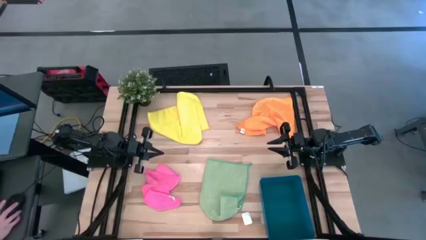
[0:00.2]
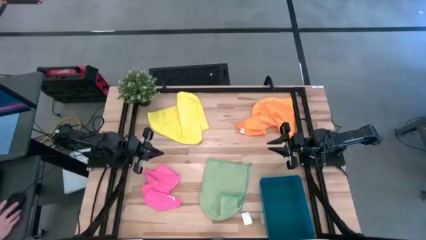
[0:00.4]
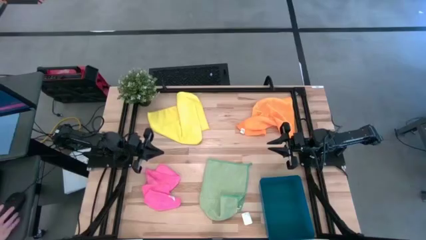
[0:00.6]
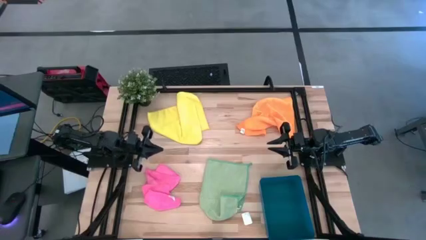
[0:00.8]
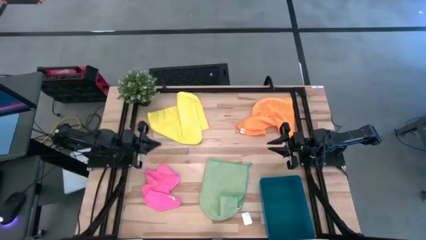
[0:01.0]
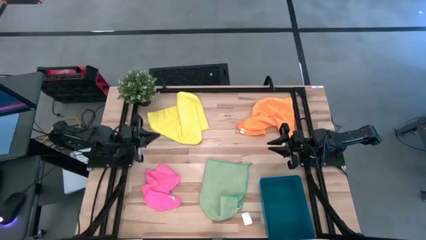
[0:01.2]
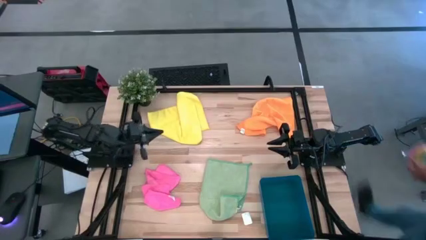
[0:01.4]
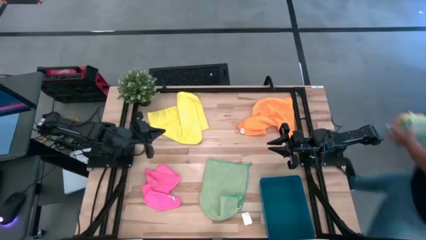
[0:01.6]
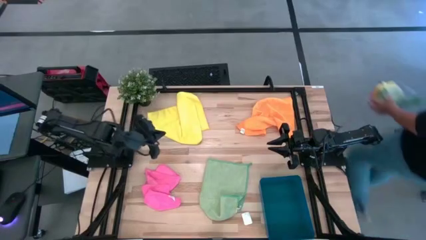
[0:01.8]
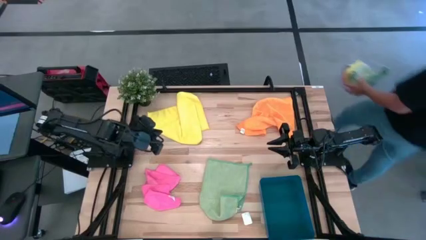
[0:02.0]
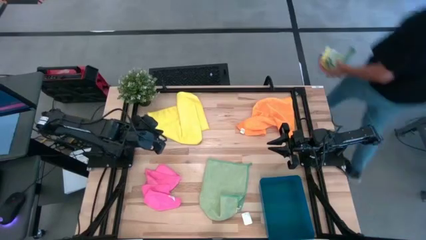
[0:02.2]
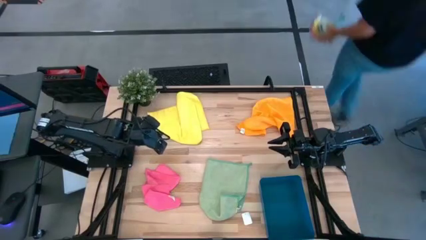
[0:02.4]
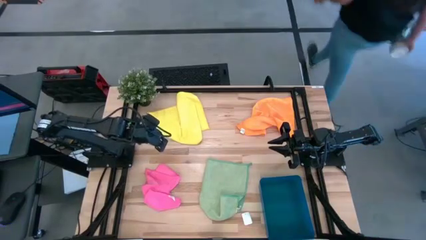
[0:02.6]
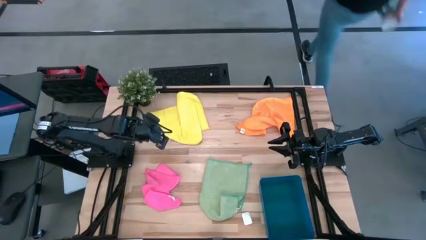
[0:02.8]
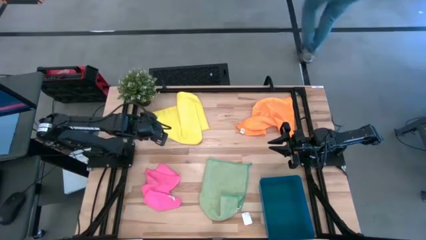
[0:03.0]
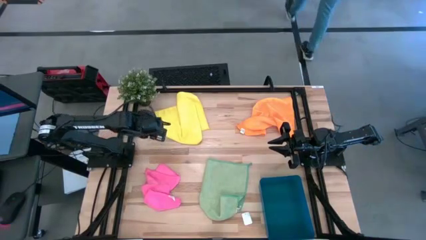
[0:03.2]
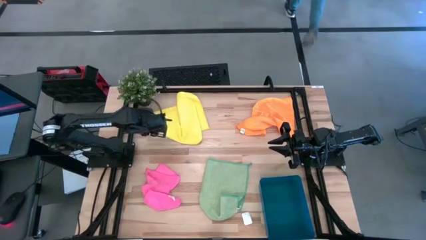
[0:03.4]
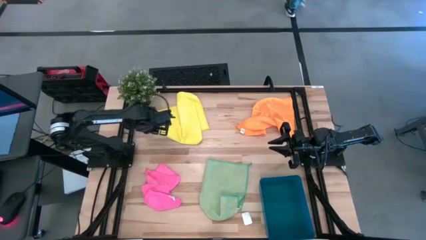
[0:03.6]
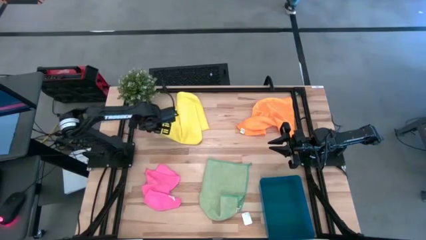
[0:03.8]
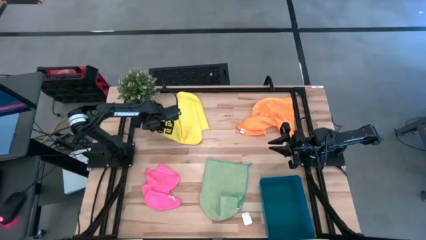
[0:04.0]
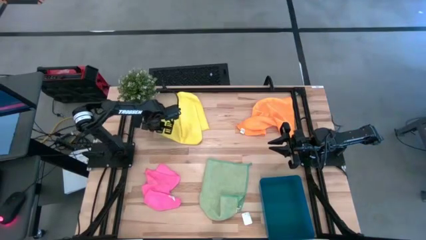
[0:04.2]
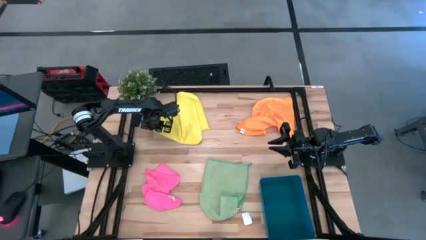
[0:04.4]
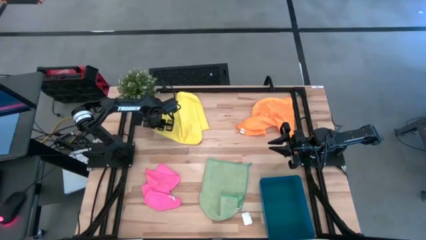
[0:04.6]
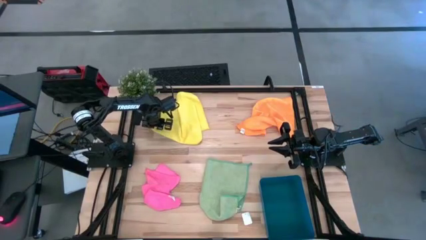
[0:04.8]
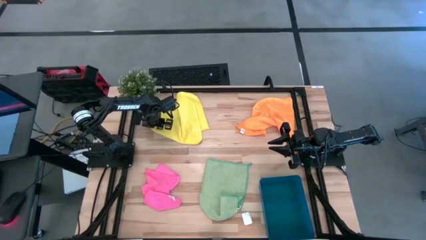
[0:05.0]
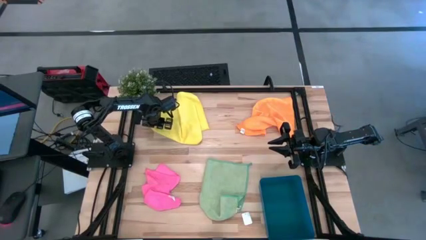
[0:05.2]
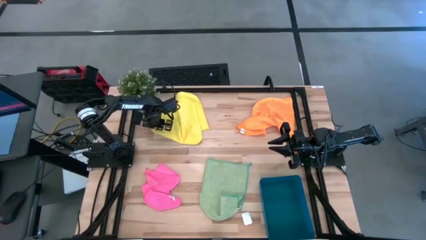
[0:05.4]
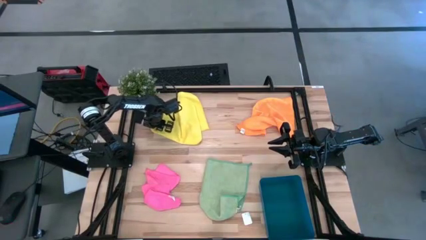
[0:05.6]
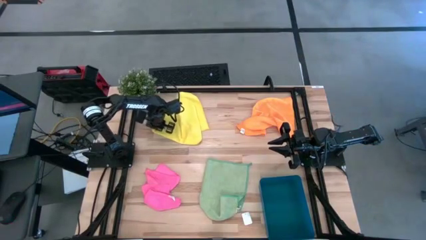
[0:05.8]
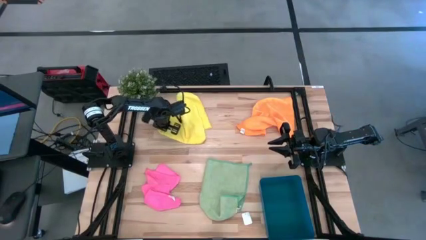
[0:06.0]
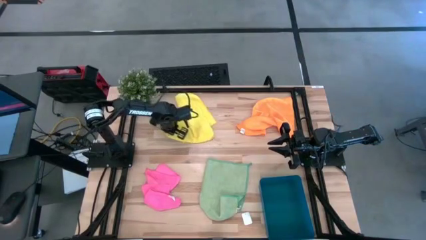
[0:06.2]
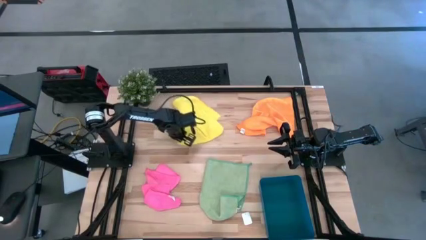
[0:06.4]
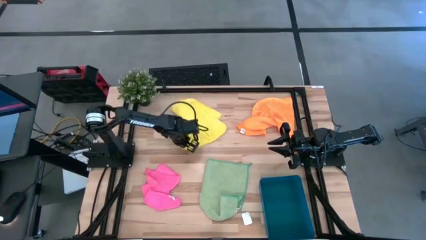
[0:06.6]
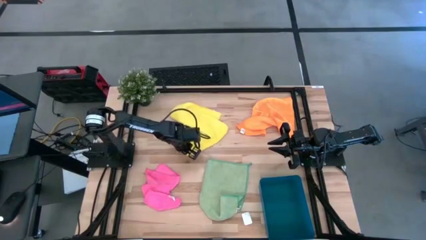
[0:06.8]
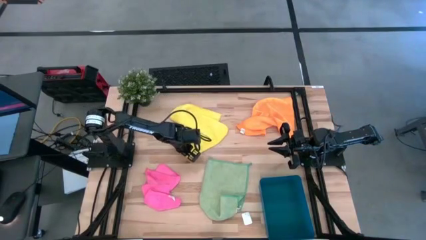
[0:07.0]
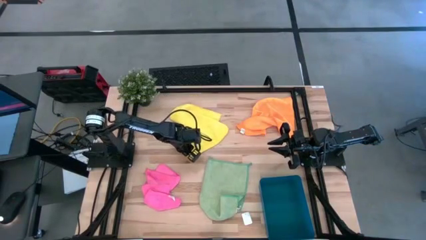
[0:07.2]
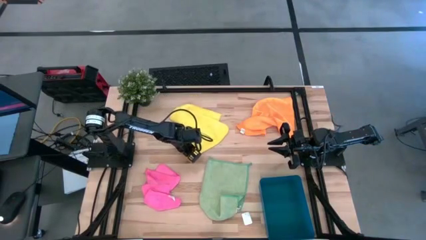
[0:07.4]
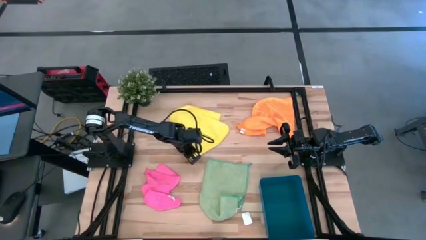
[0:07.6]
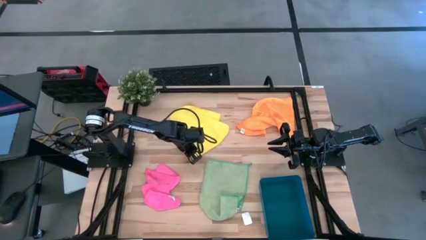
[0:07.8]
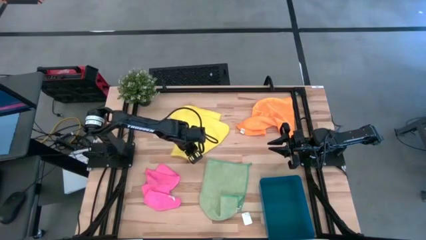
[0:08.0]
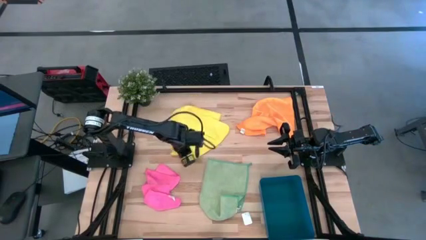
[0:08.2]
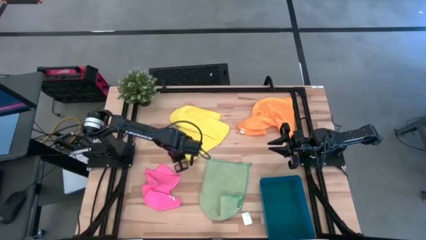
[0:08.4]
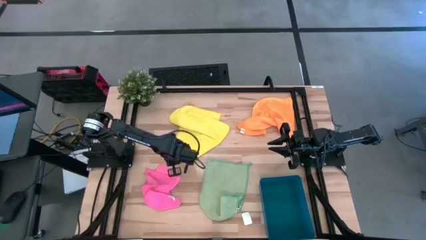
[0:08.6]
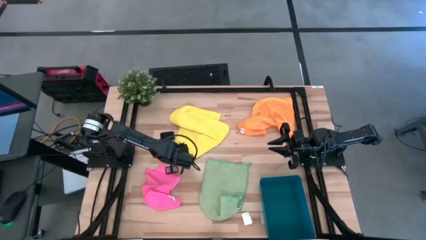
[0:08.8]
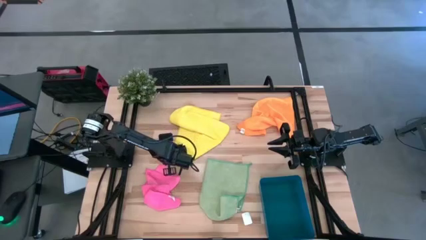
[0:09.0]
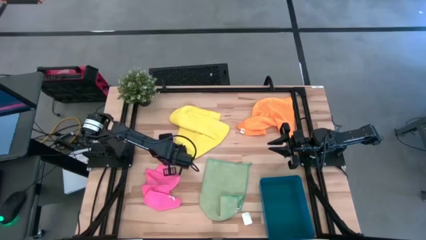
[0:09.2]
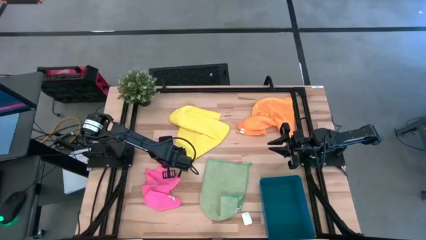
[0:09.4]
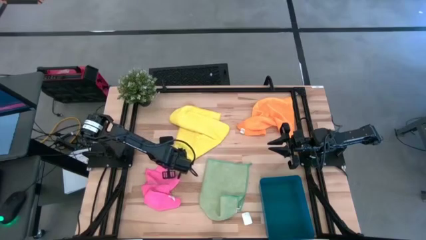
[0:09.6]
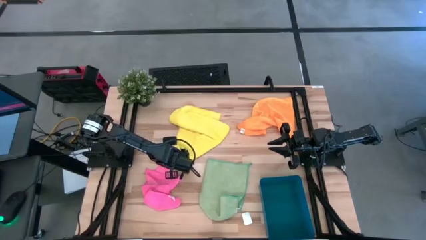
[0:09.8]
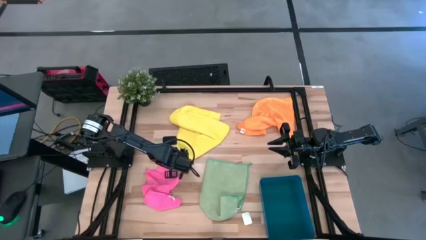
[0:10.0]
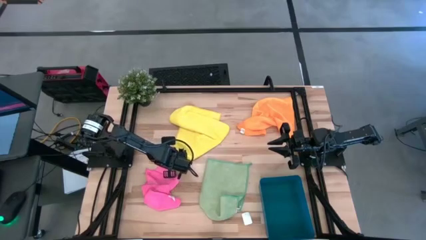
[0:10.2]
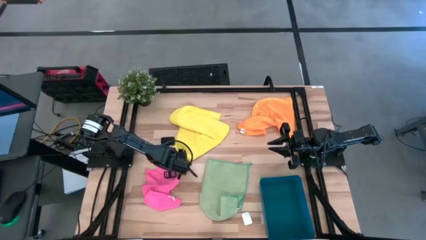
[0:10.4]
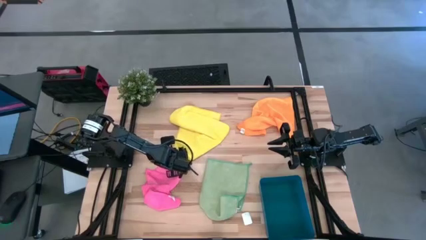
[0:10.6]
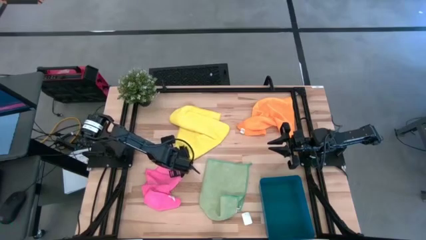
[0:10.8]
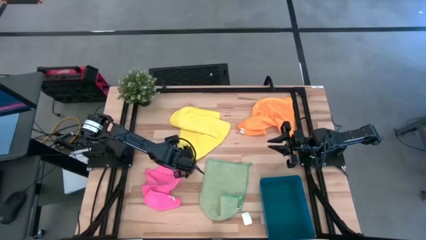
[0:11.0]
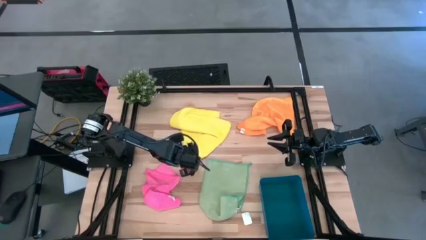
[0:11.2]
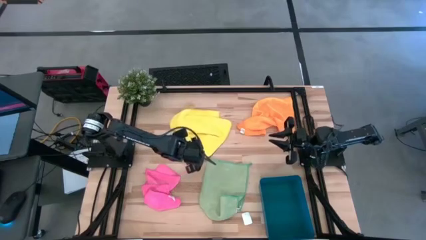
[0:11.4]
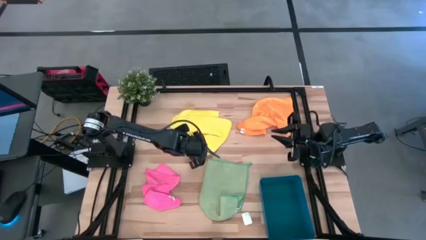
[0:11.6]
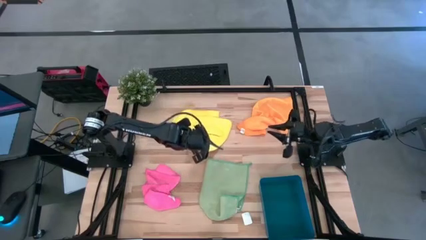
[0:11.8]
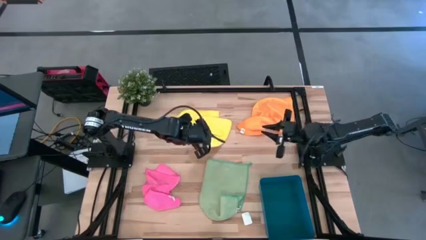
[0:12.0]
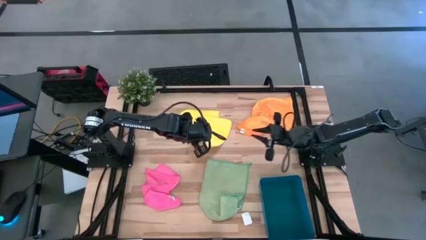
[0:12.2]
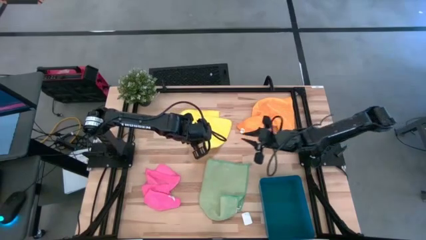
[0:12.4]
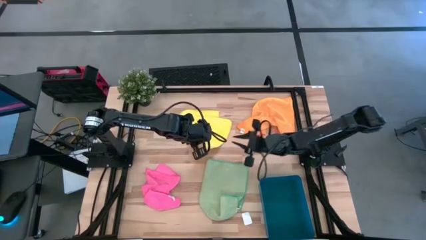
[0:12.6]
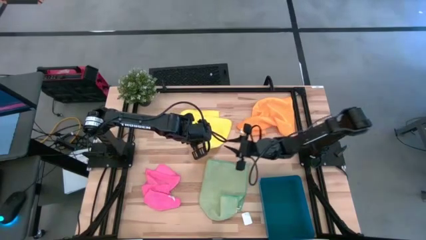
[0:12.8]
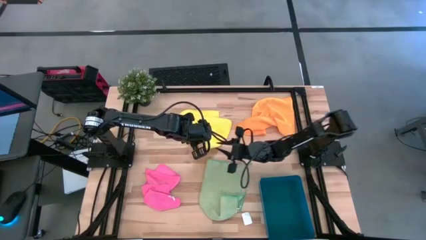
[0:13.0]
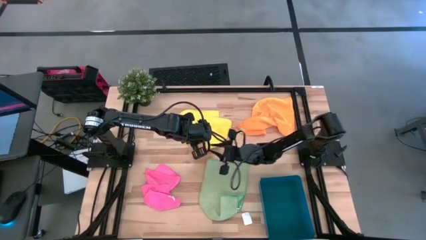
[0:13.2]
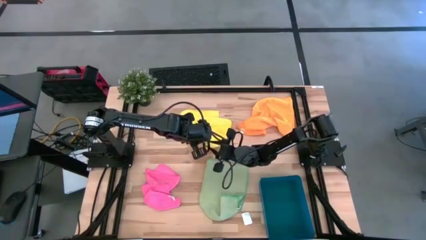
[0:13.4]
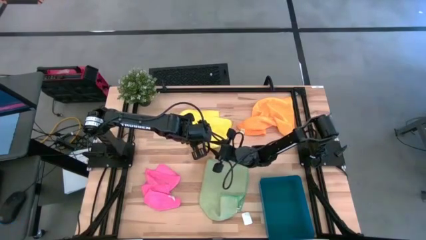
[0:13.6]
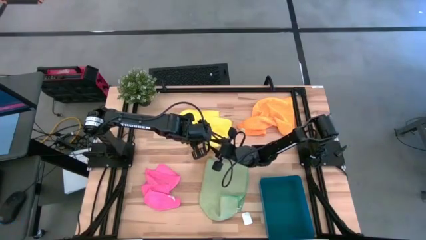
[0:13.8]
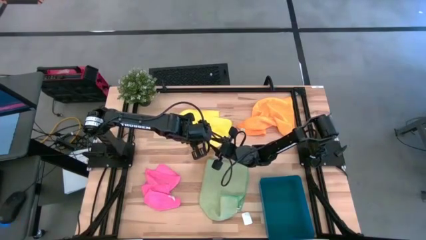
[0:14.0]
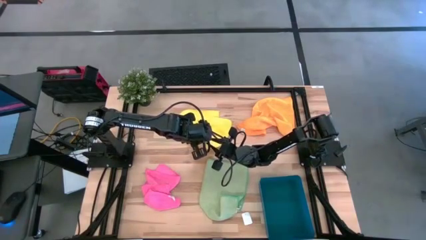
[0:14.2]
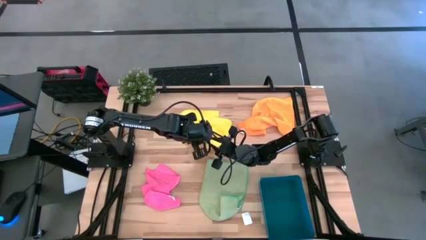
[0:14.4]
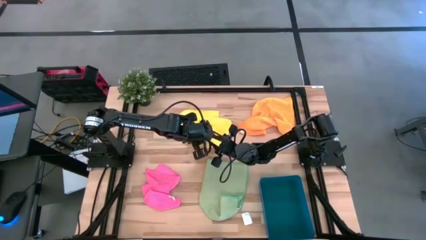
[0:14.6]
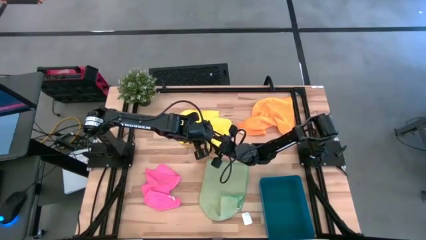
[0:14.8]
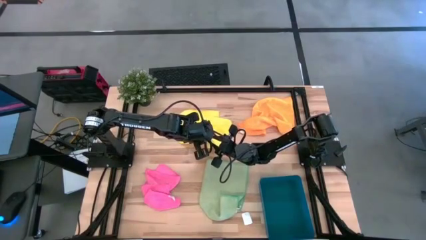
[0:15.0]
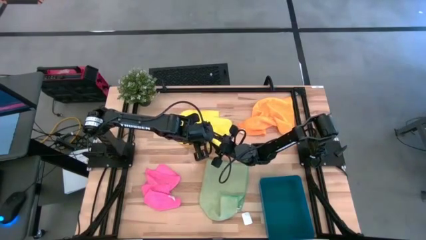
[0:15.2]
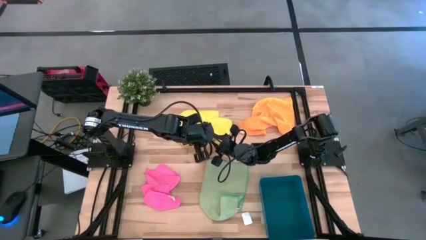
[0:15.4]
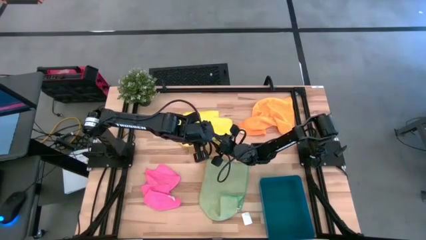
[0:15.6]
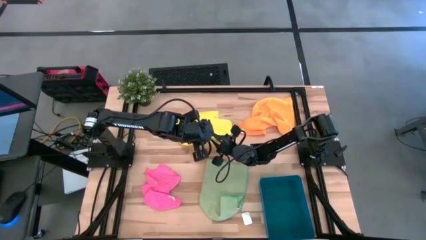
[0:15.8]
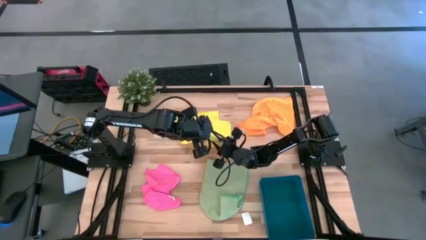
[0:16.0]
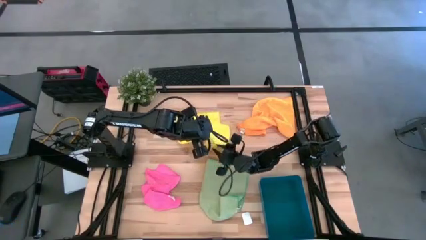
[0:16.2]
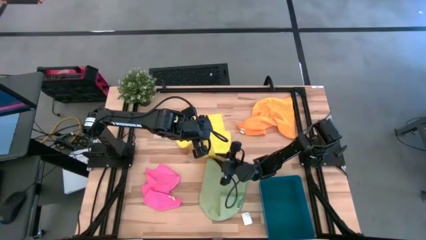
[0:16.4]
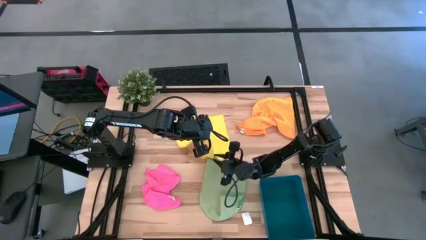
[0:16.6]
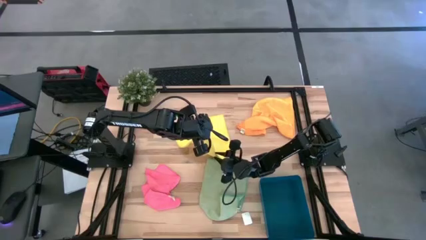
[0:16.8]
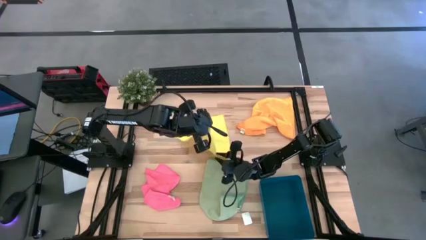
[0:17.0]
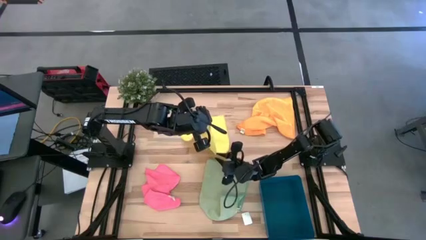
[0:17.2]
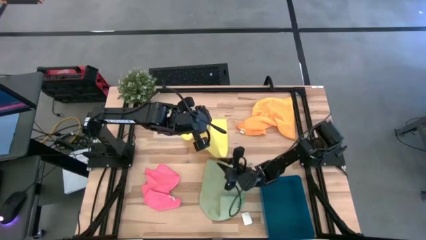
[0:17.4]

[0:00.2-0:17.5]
Task: Fold microfiber towels
Fold the yellow microfiber towel
